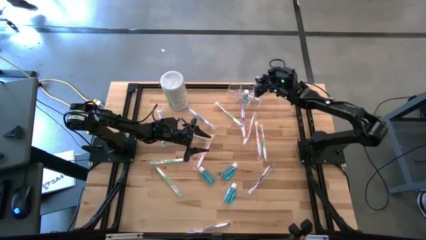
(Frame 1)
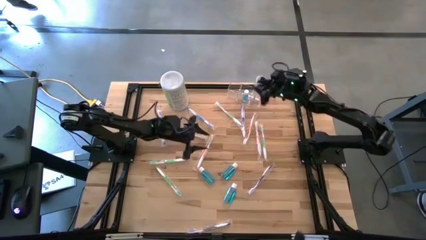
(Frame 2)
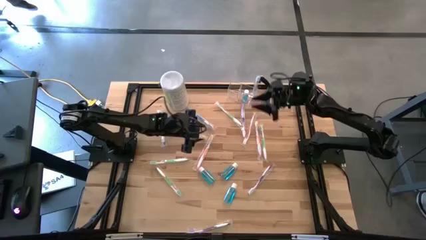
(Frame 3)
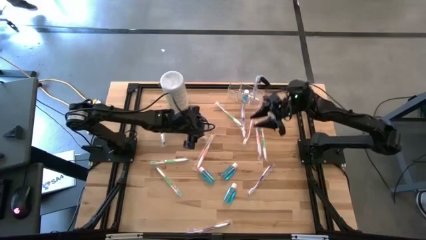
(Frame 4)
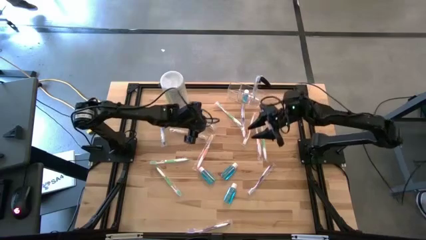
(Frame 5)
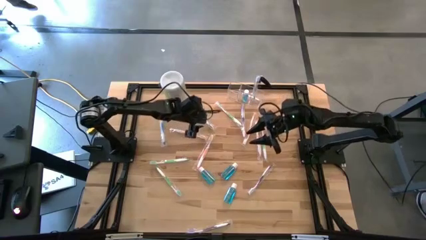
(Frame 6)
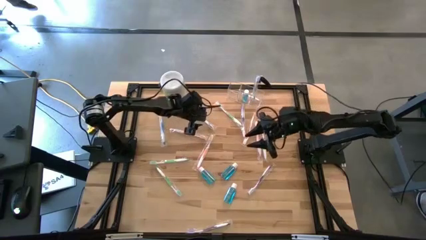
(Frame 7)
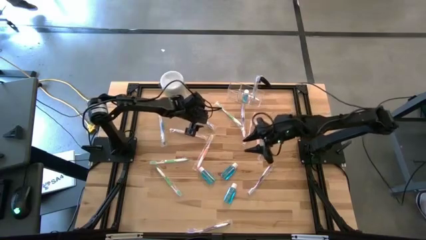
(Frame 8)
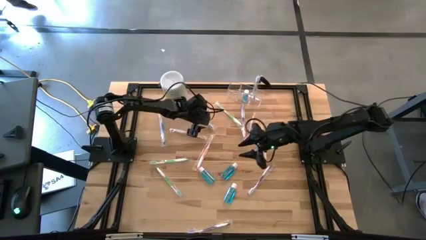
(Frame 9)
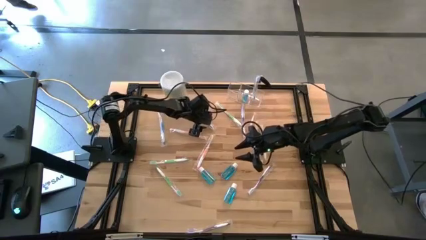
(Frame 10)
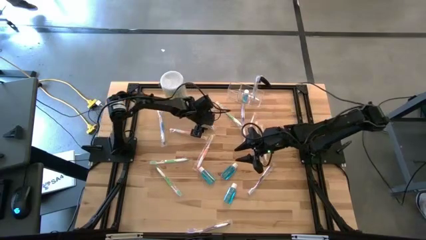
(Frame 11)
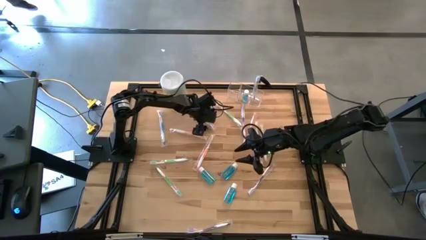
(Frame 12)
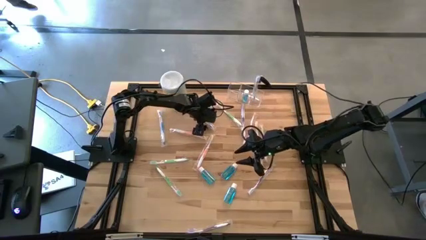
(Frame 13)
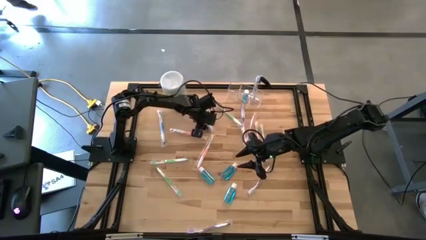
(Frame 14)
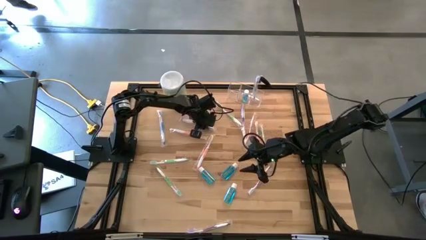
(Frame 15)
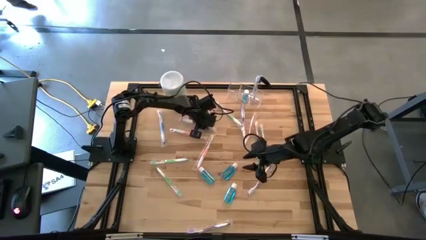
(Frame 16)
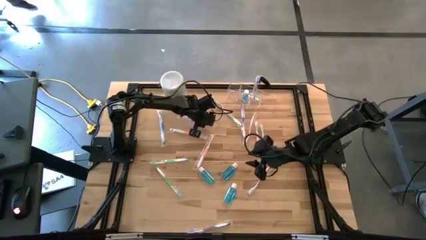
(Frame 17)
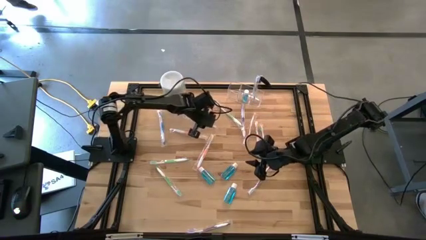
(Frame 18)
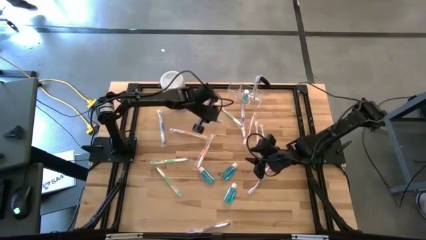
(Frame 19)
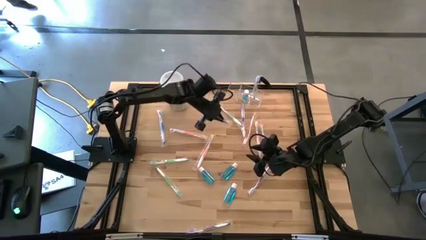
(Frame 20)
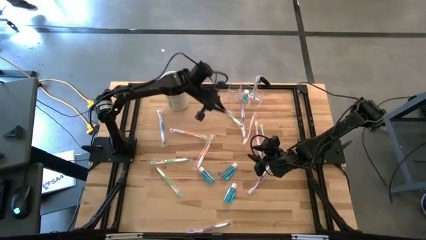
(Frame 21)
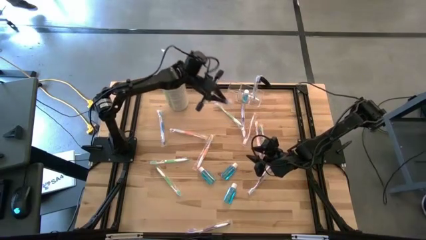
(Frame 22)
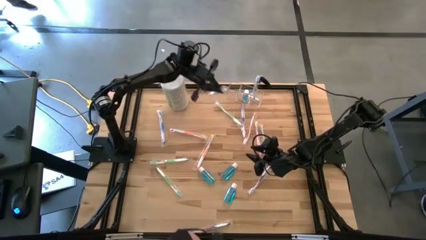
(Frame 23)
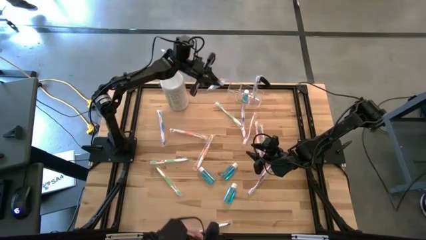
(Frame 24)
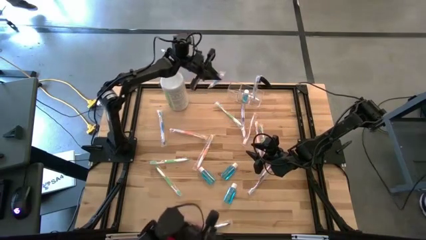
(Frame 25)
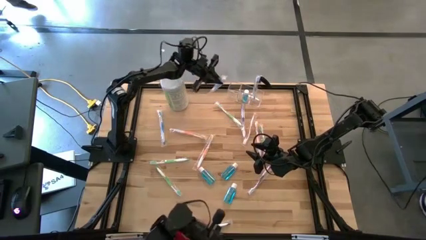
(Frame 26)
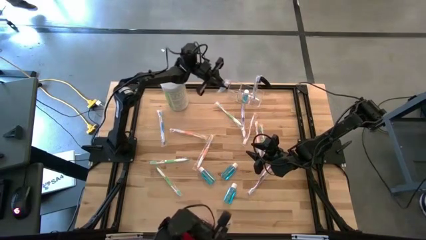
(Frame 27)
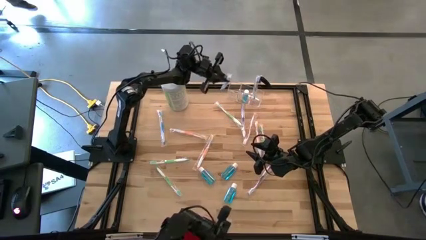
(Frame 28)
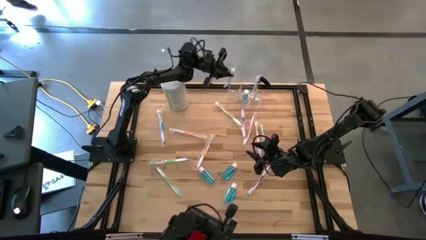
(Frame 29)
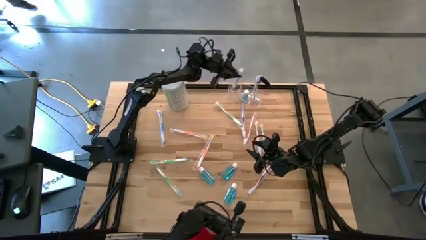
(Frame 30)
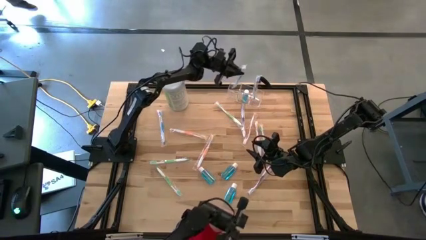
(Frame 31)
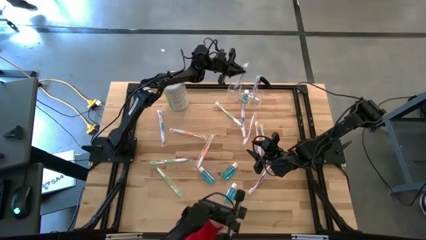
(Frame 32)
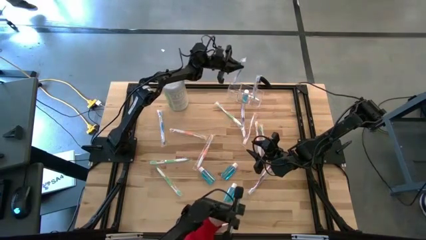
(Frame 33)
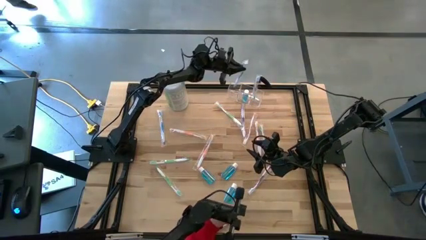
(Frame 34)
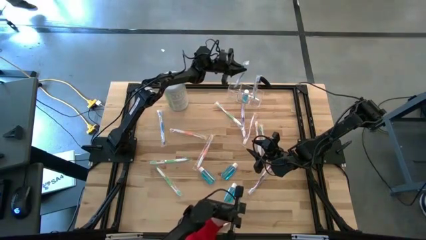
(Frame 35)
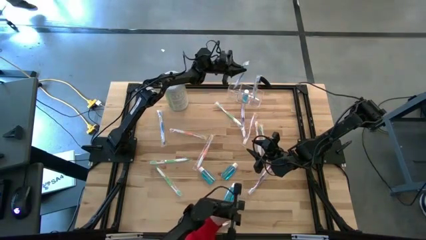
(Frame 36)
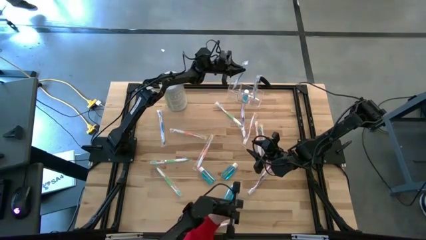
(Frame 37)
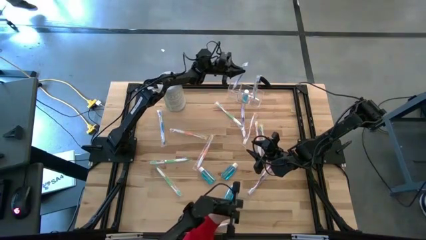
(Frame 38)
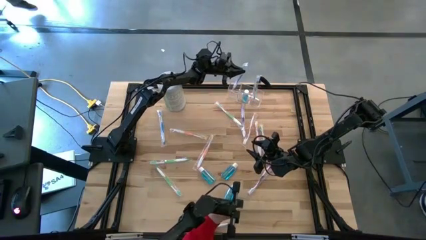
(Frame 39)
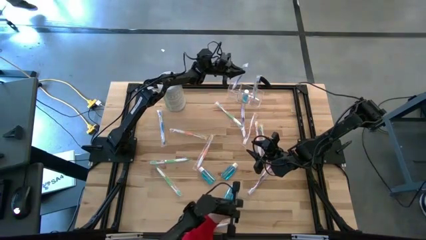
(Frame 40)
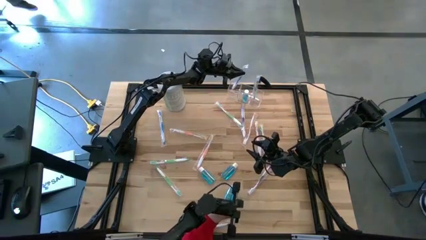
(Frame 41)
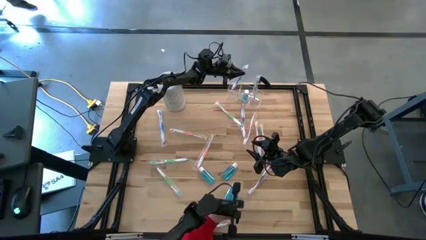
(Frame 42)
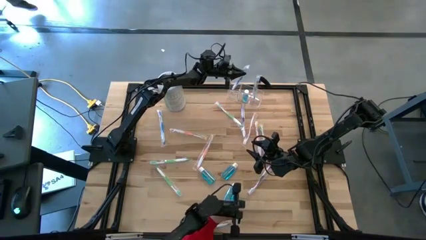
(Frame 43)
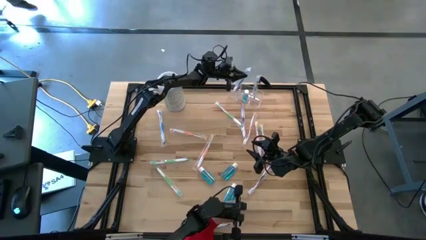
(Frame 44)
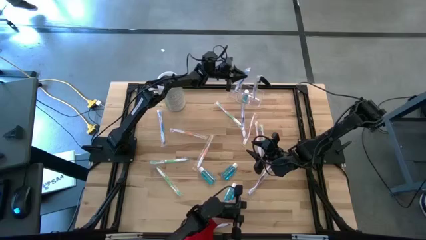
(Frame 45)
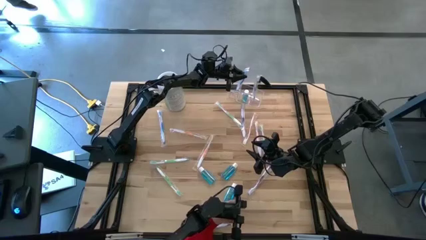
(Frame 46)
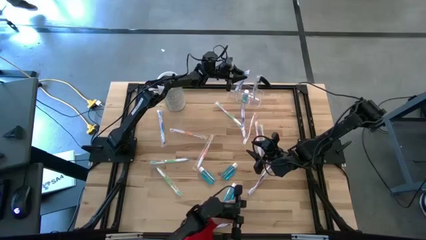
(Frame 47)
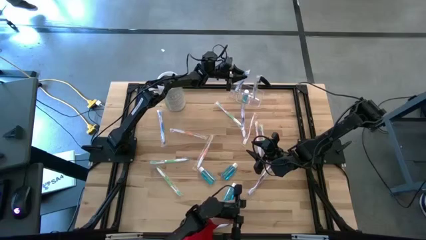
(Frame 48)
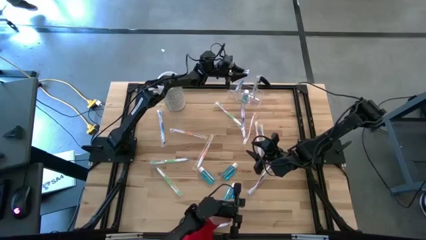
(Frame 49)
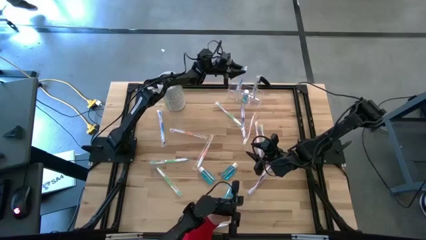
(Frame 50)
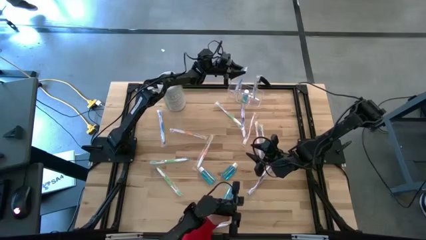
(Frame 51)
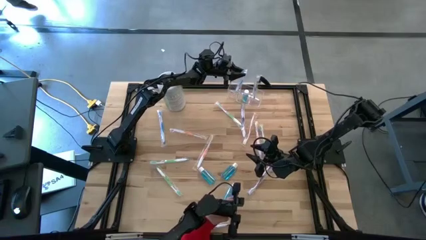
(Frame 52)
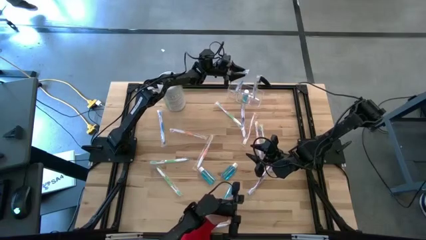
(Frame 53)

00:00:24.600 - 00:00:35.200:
Task: Pick & Place toothbrushing station
Put the blue toothbrush into the transparent organizer

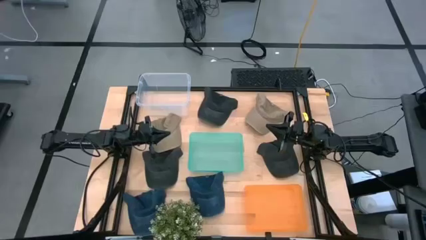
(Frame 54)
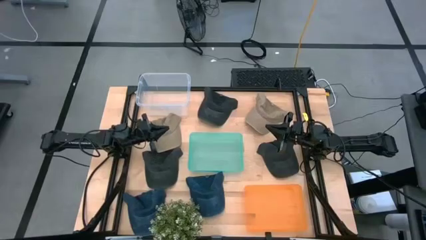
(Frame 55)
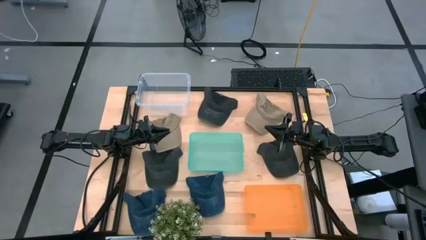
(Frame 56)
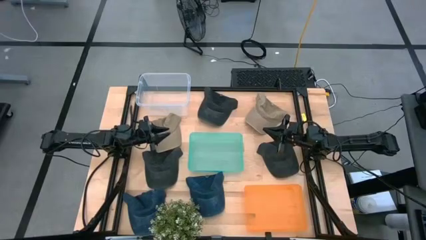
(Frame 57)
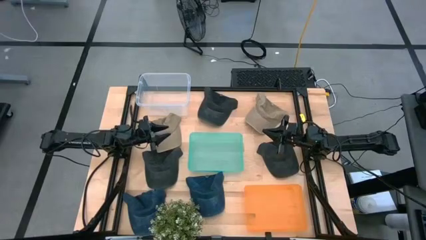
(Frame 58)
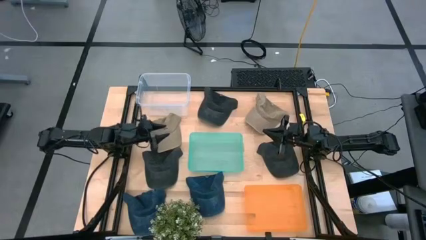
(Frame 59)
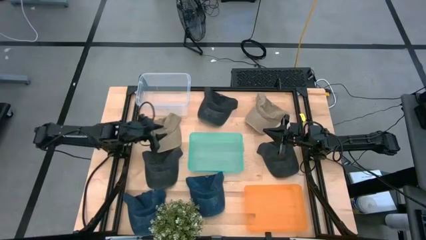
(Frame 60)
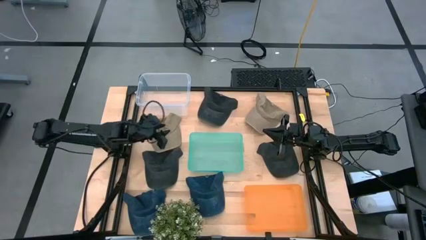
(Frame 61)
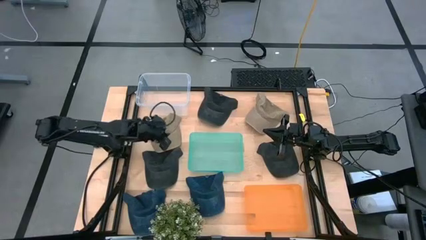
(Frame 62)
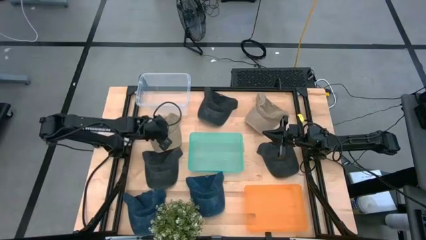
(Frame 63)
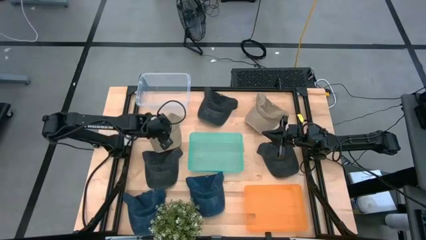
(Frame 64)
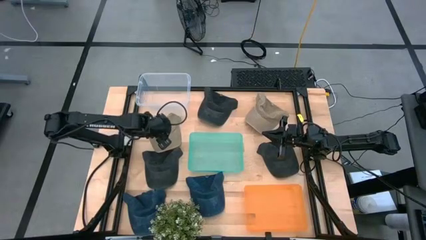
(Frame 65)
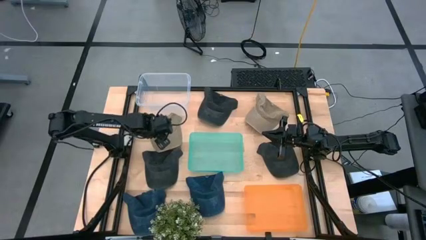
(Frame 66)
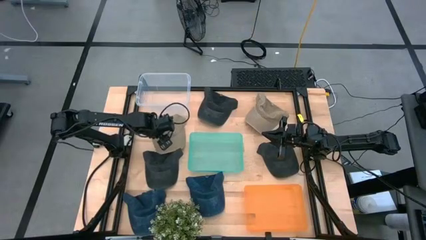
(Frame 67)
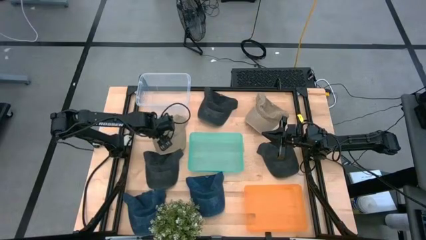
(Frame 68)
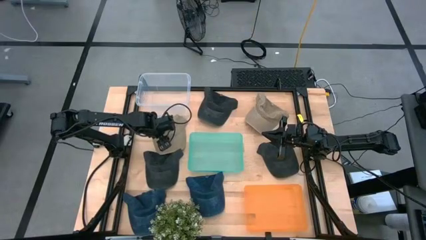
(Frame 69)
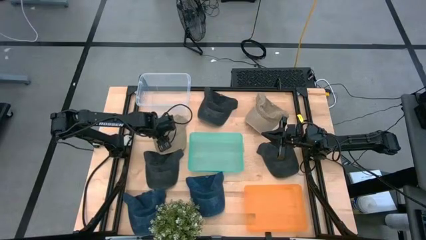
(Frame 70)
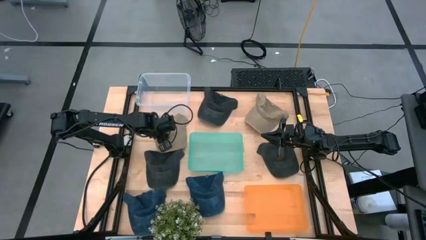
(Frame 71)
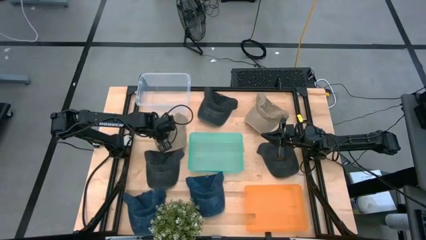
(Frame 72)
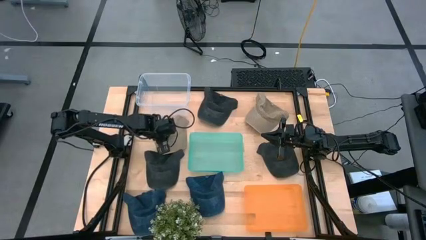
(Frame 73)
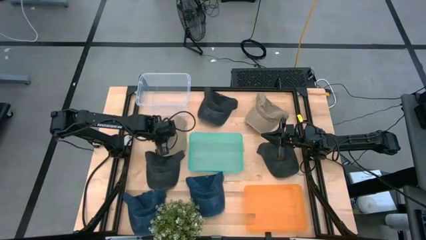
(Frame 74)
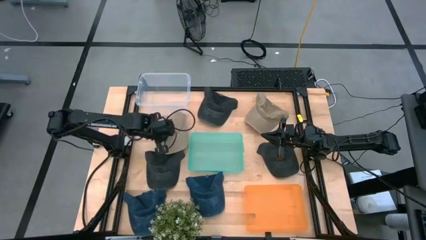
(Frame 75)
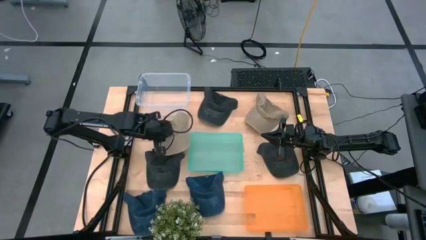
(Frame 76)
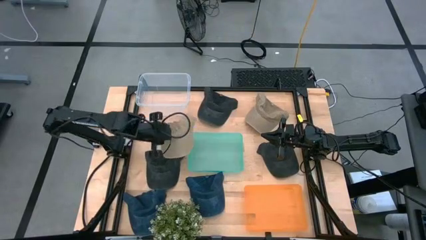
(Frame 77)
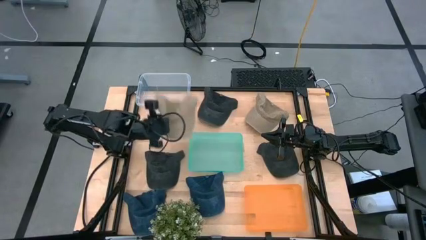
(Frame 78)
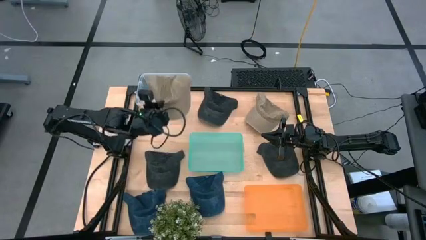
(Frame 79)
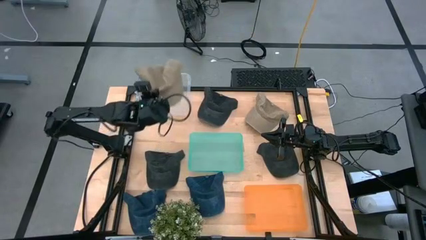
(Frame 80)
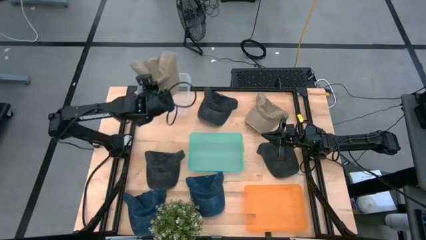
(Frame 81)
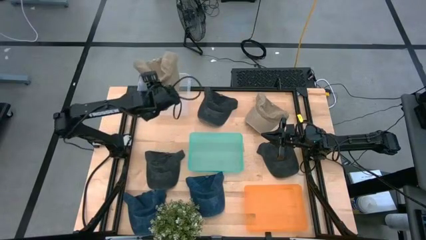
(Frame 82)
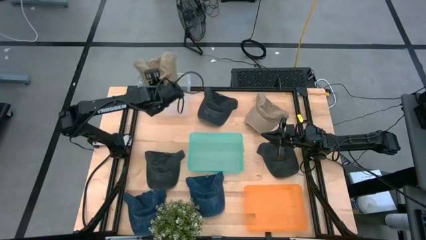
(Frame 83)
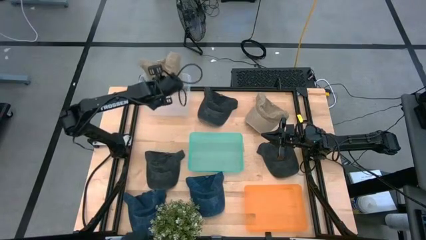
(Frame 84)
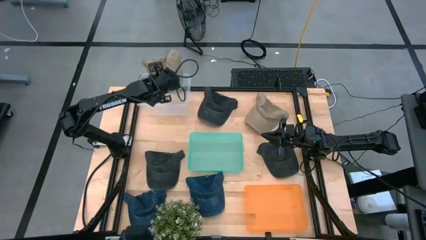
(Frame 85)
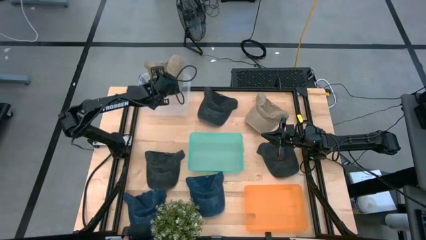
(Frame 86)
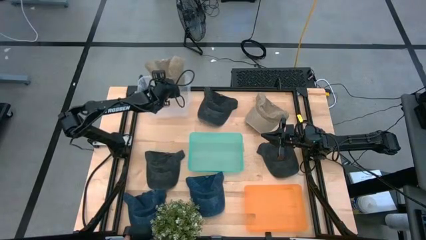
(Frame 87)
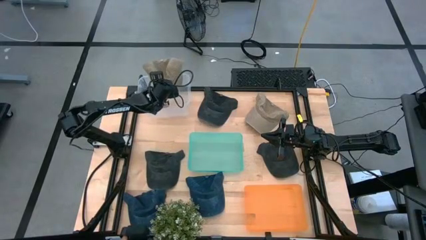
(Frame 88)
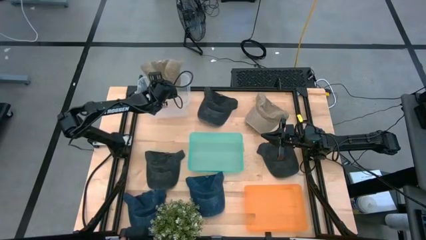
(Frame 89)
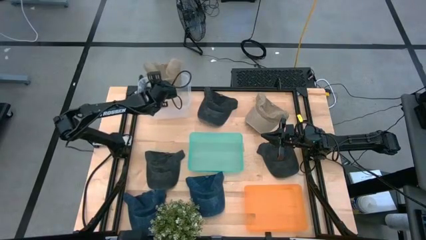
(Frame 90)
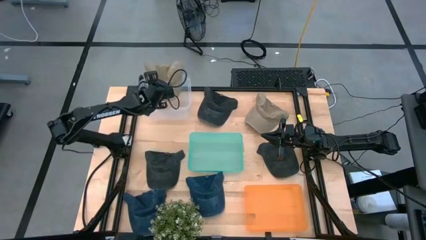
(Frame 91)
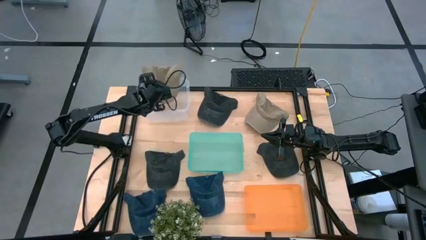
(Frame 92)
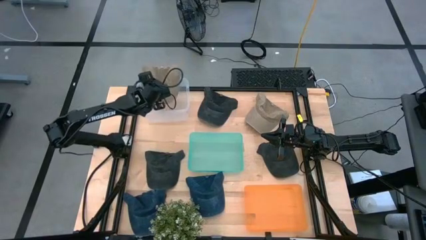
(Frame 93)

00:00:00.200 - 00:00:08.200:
Task: Pick & Place hat
Put the left brown cap into the transparent bin
